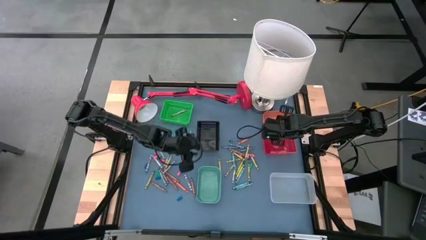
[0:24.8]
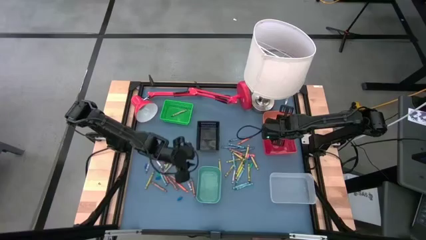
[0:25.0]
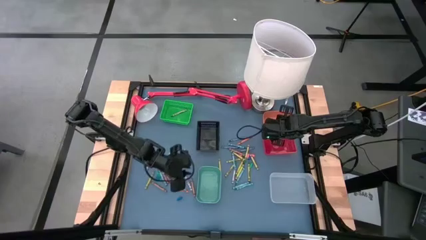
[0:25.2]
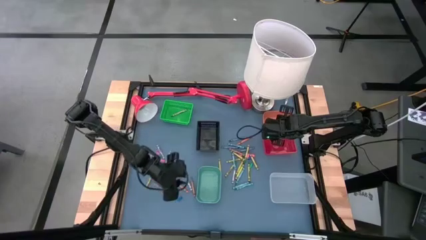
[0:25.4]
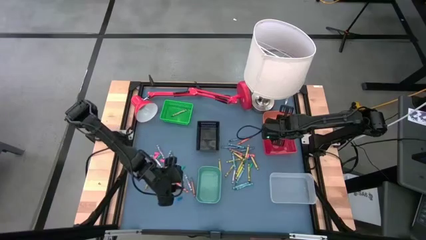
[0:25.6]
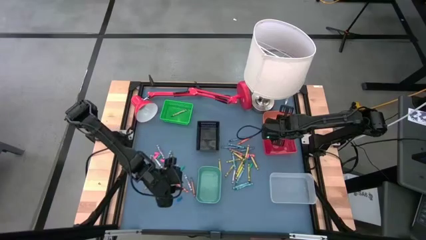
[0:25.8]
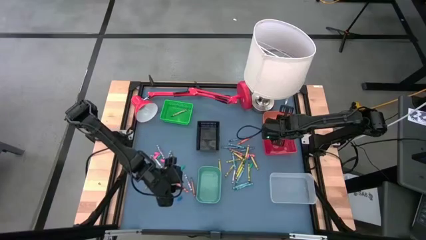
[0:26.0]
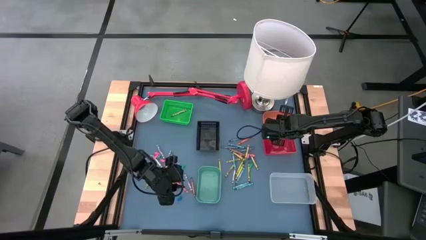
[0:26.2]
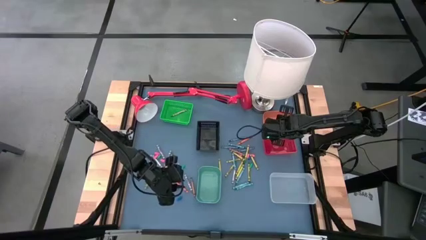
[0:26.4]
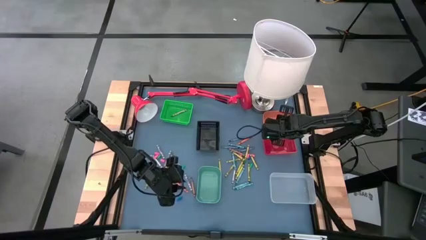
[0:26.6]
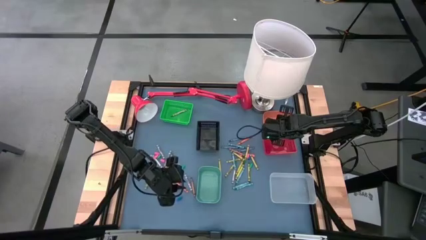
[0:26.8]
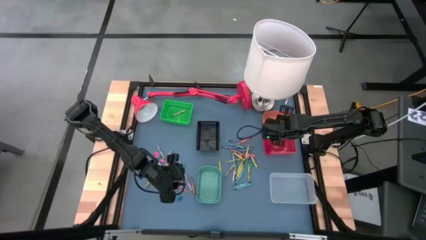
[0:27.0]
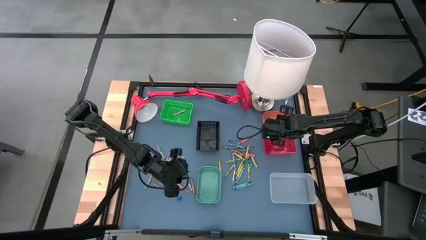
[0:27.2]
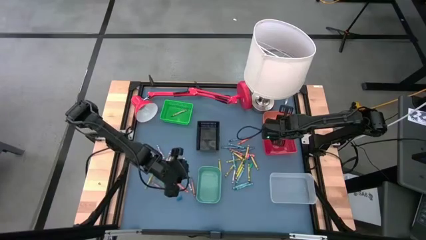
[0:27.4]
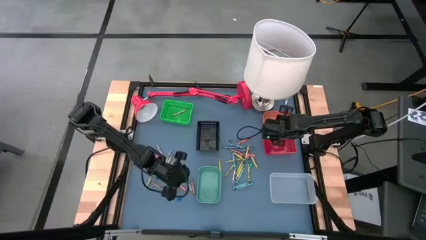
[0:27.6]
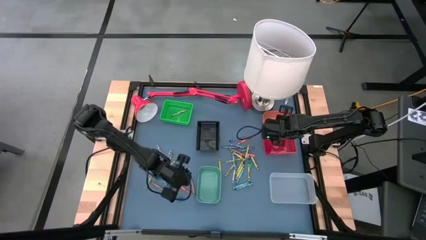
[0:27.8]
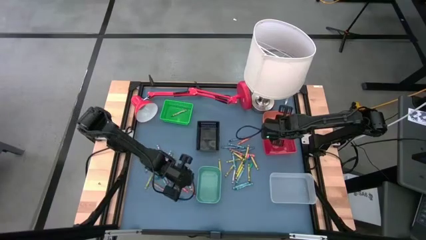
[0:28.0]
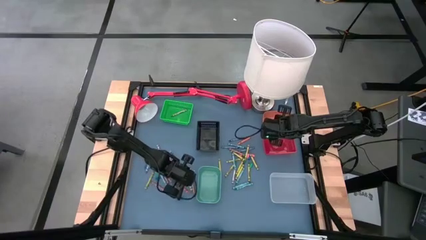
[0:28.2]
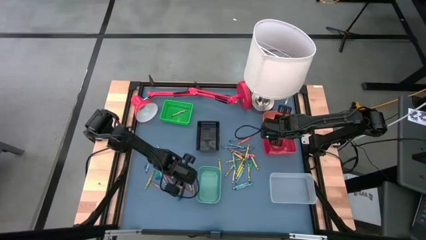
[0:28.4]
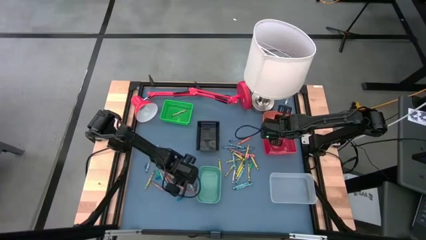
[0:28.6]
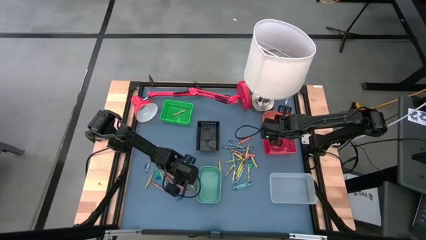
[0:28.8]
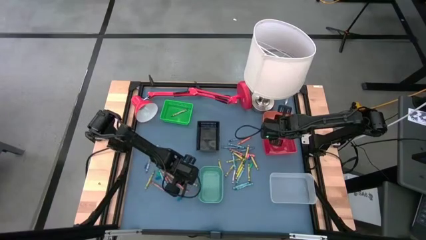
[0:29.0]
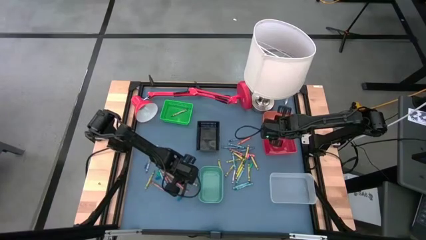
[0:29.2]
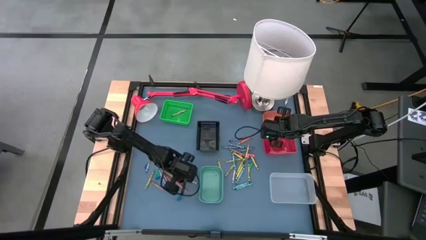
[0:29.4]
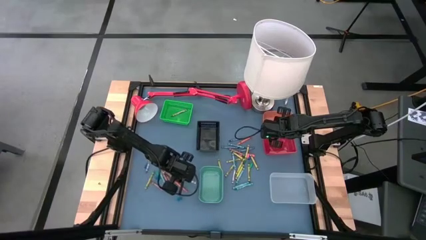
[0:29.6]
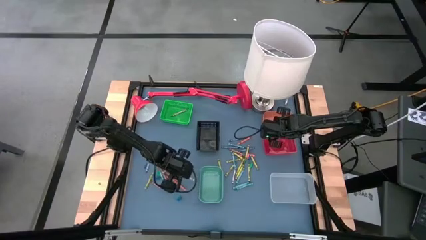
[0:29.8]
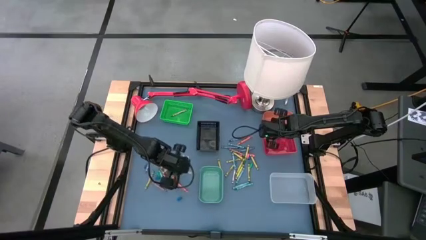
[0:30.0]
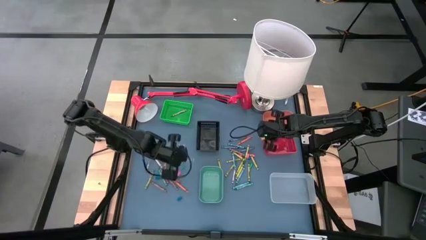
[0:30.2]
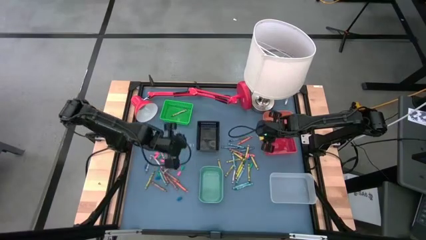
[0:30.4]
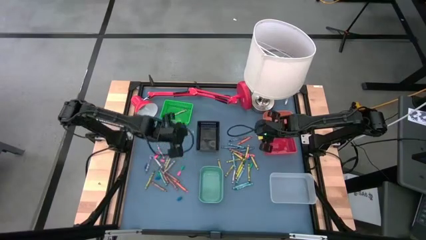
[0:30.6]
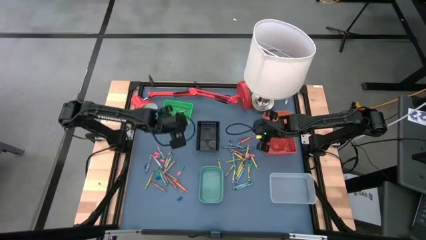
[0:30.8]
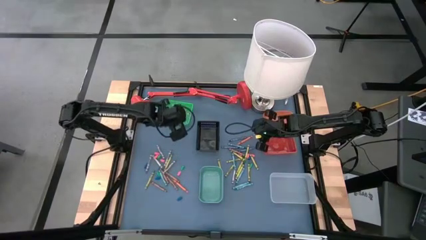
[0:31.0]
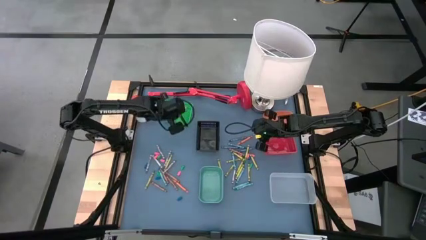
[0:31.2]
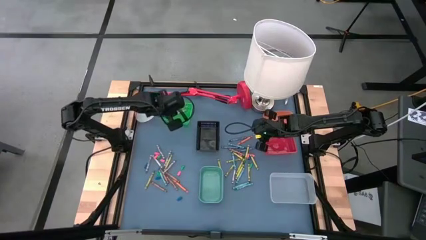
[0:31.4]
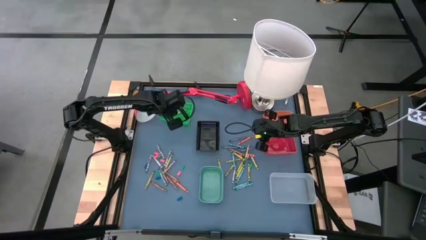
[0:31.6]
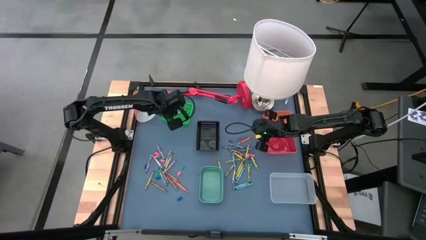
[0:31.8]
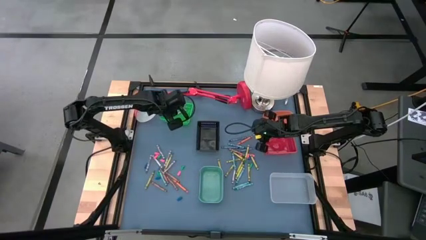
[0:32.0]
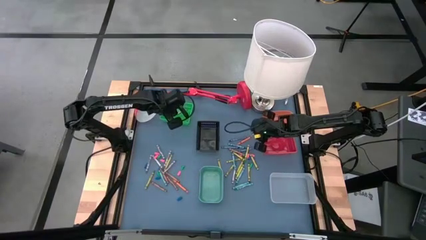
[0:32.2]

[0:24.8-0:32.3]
Task: Sort crayons
Put the gray crayon into the green bin

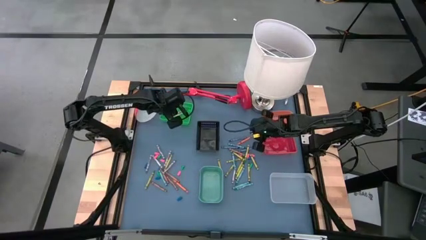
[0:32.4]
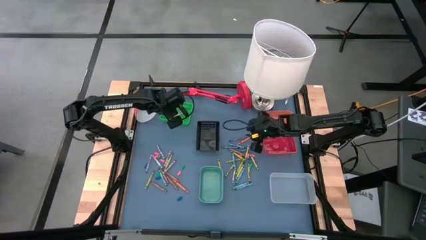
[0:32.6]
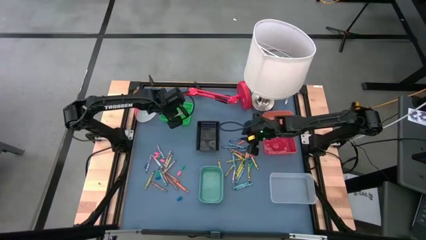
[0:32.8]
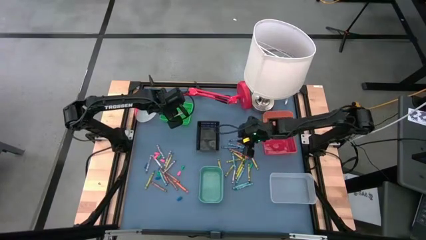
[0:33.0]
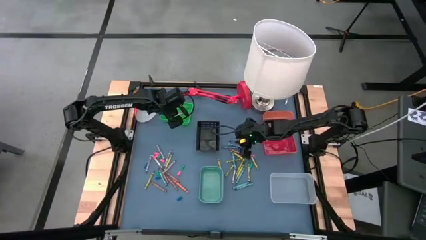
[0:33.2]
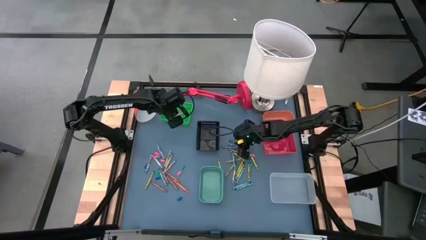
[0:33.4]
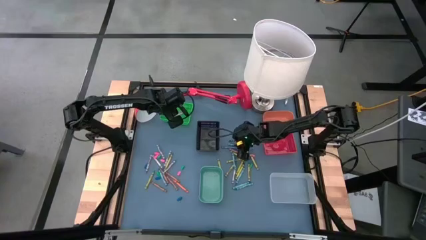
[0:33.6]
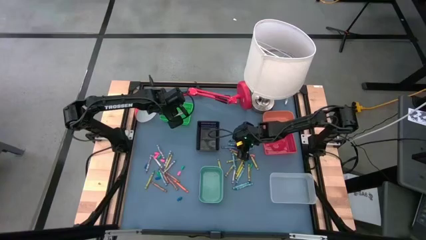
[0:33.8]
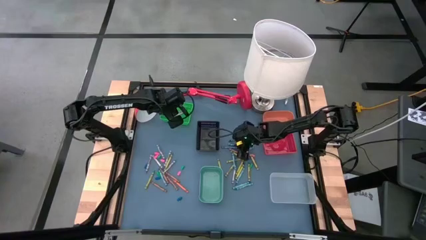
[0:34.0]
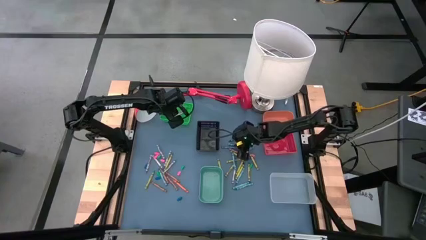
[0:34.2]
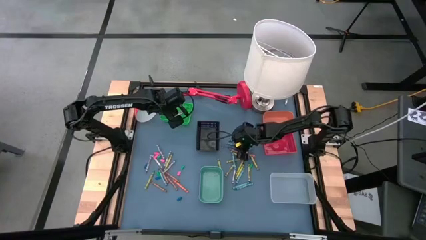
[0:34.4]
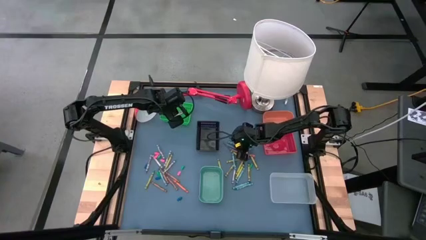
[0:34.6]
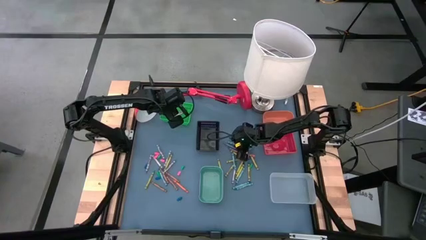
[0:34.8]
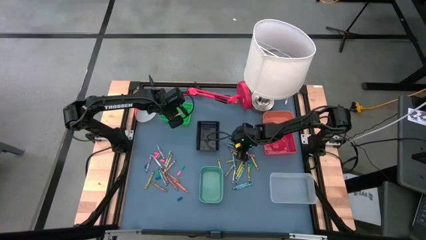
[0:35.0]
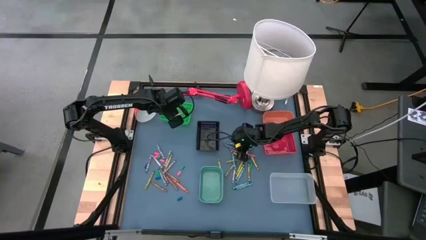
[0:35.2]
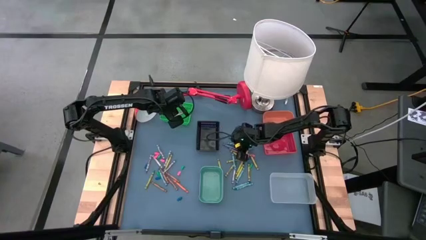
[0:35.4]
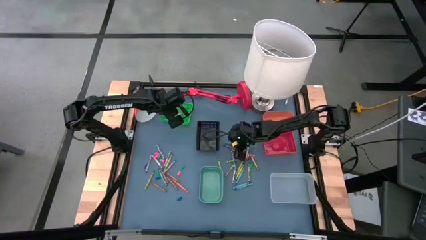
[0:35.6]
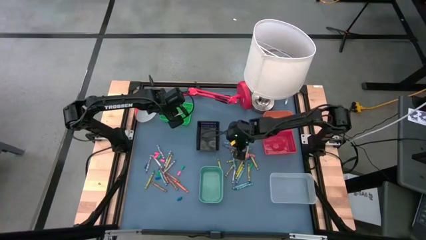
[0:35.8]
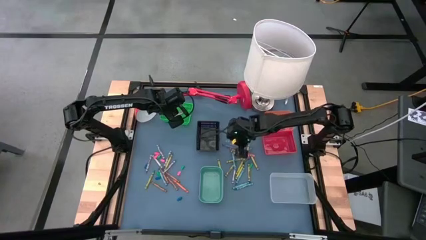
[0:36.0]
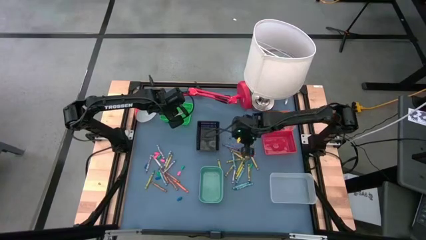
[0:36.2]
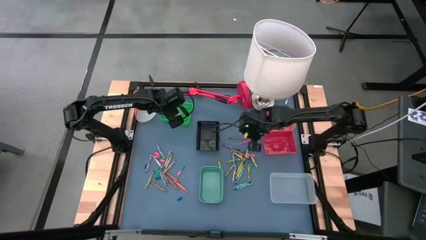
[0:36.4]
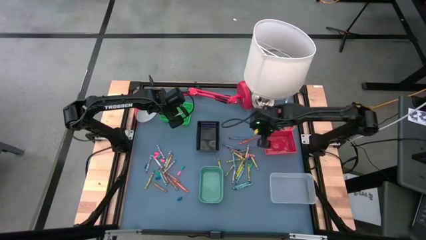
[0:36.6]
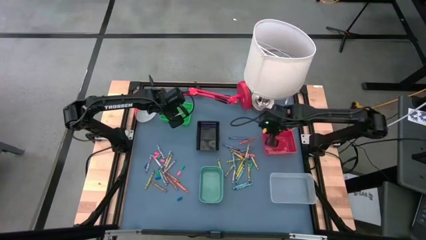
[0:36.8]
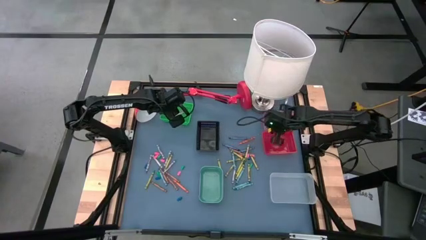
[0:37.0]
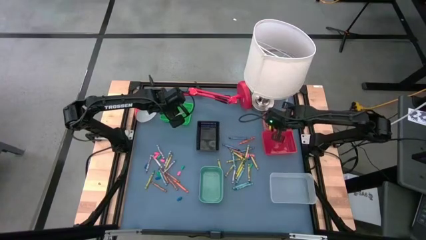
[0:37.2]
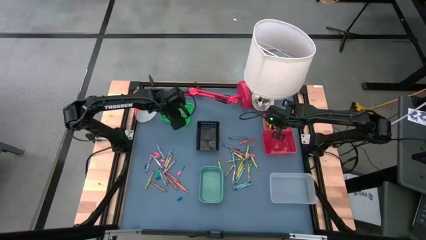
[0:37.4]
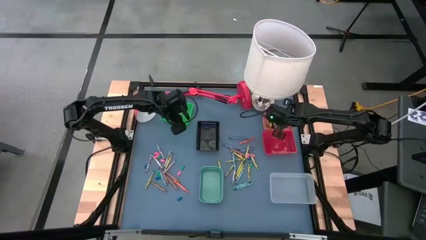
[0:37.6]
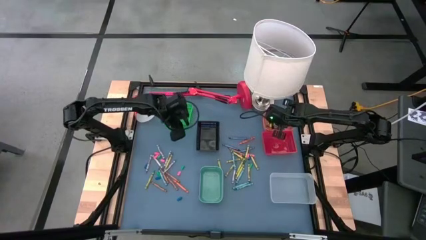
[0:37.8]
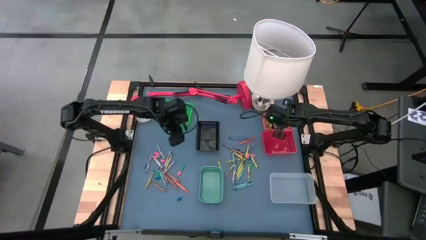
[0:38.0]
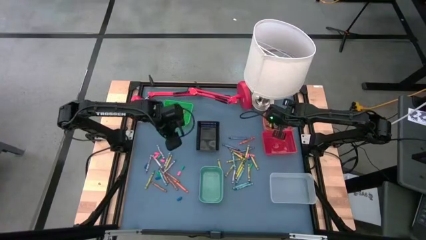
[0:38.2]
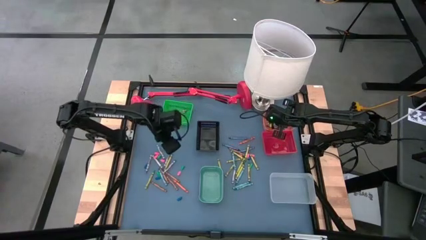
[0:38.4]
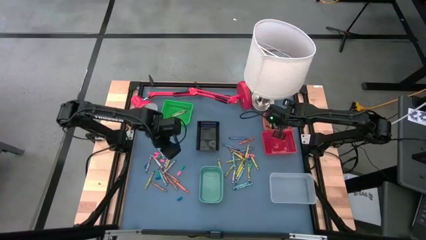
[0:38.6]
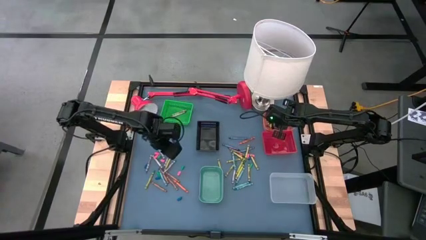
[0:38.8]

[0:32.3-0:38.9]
Put the blue green crayon into the orange bin
